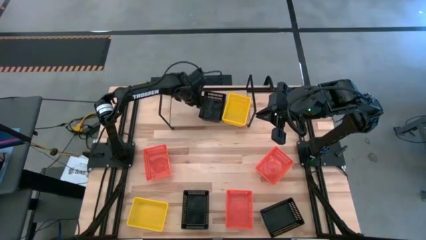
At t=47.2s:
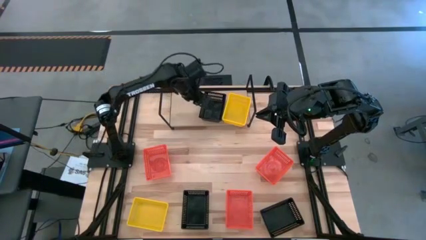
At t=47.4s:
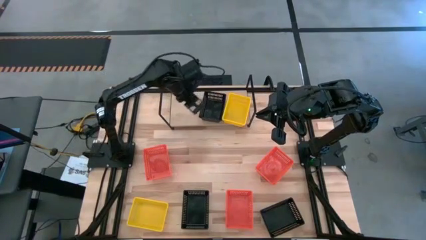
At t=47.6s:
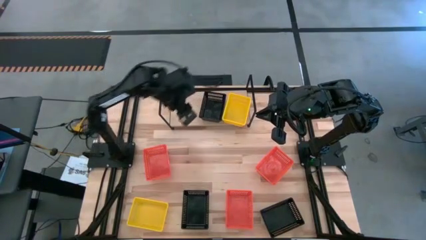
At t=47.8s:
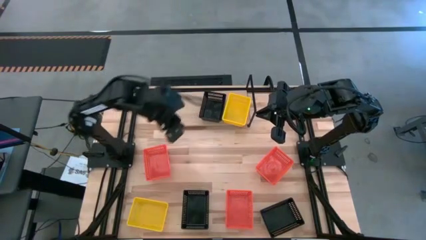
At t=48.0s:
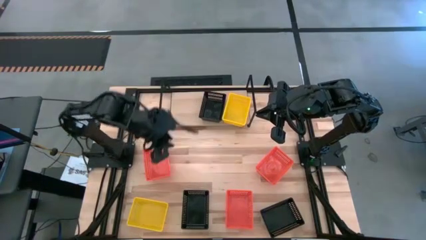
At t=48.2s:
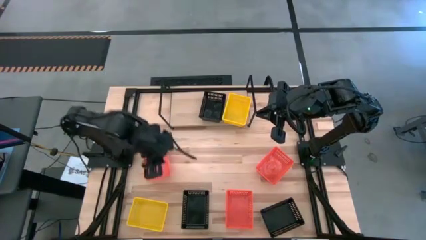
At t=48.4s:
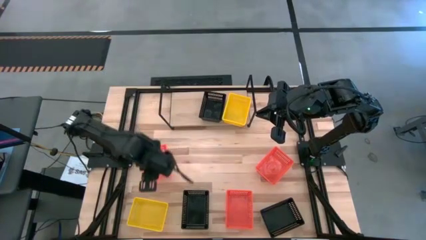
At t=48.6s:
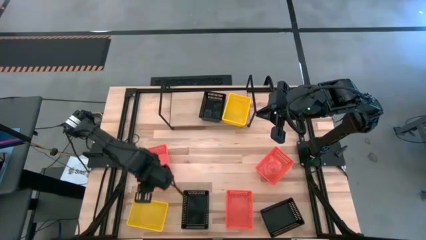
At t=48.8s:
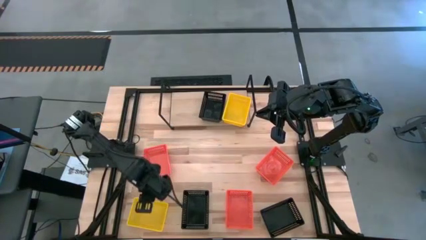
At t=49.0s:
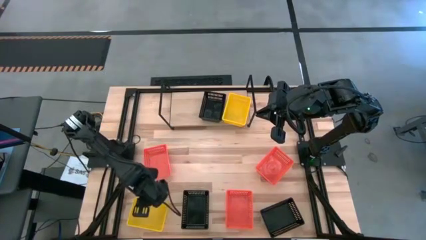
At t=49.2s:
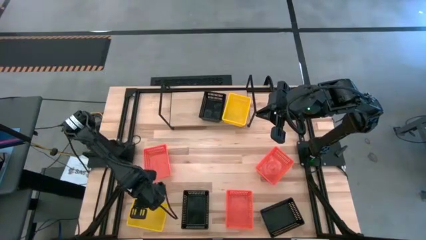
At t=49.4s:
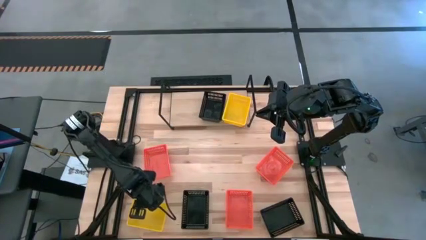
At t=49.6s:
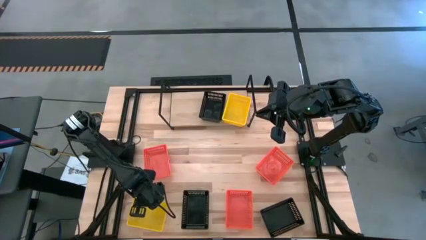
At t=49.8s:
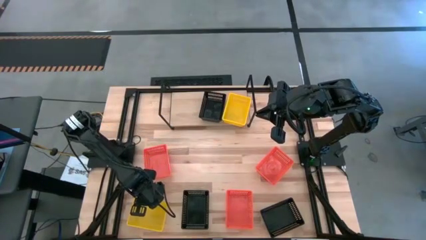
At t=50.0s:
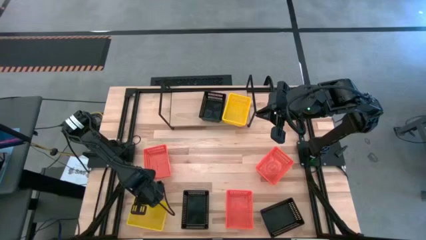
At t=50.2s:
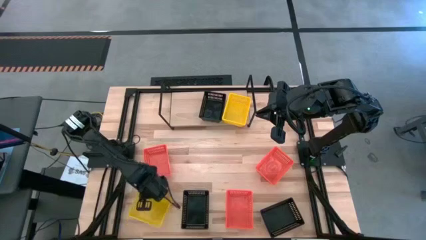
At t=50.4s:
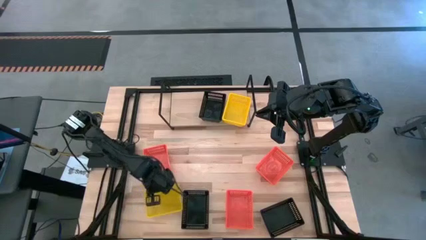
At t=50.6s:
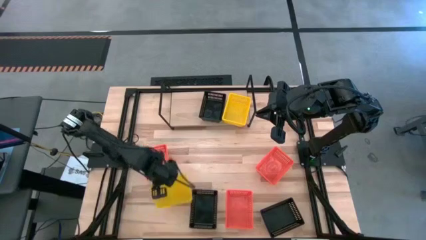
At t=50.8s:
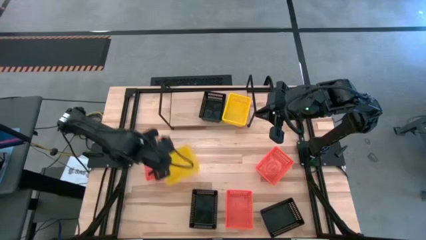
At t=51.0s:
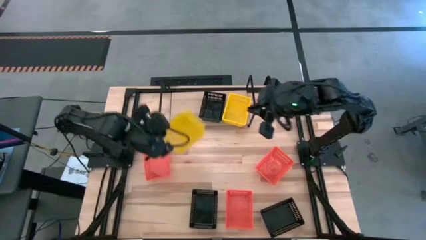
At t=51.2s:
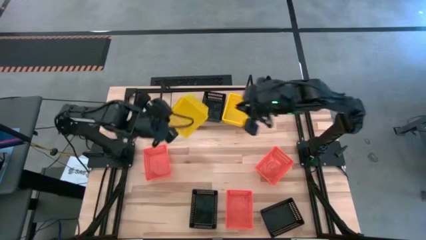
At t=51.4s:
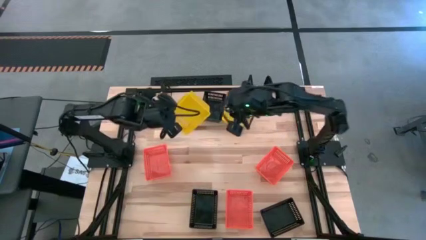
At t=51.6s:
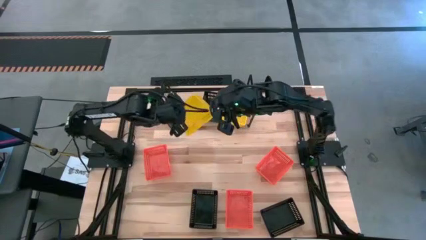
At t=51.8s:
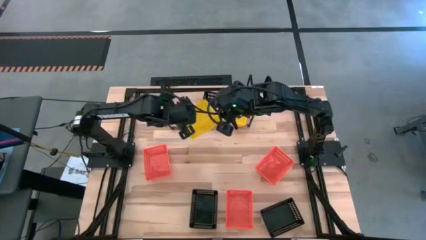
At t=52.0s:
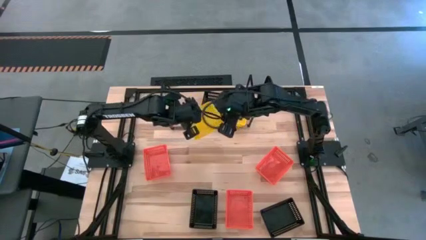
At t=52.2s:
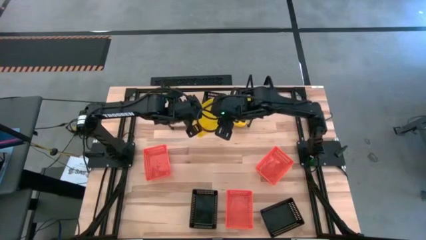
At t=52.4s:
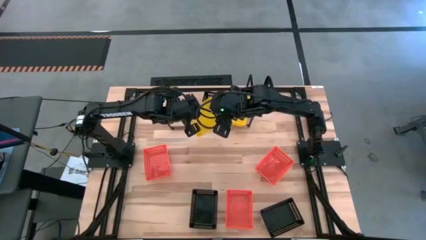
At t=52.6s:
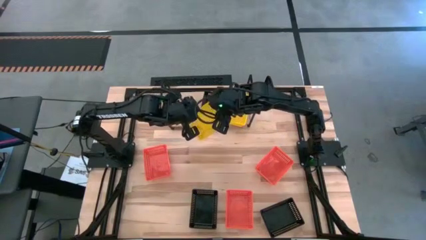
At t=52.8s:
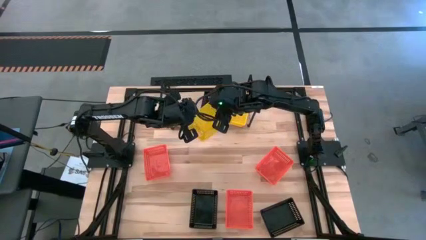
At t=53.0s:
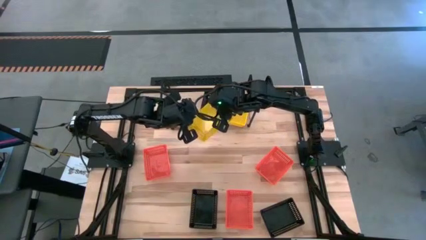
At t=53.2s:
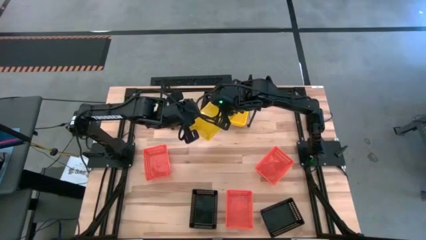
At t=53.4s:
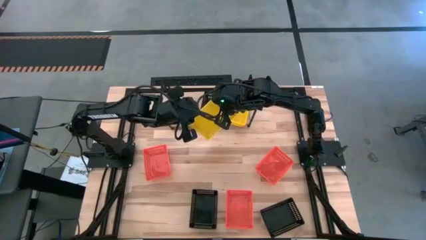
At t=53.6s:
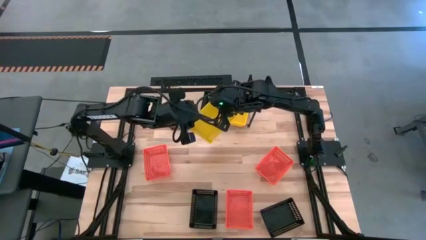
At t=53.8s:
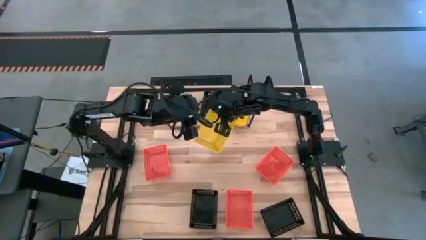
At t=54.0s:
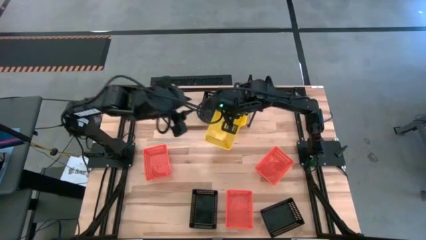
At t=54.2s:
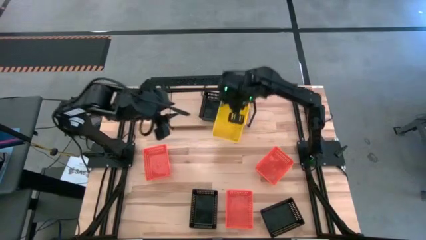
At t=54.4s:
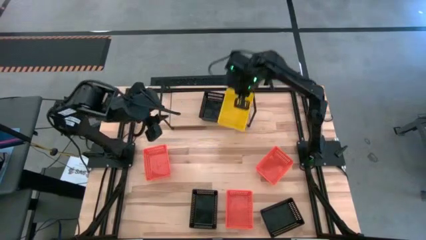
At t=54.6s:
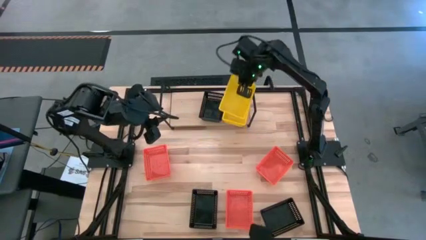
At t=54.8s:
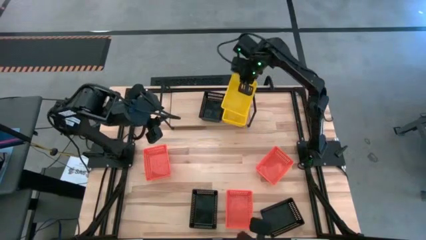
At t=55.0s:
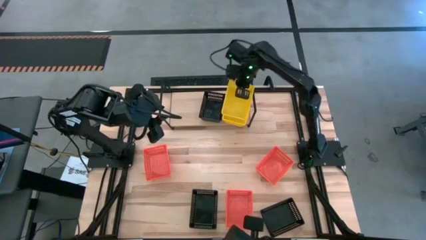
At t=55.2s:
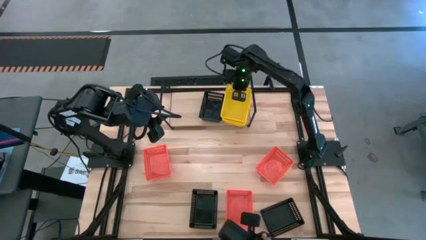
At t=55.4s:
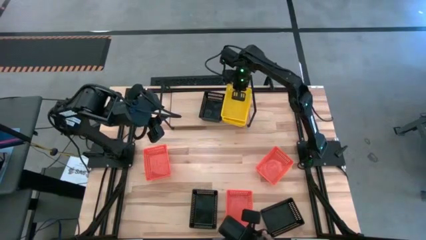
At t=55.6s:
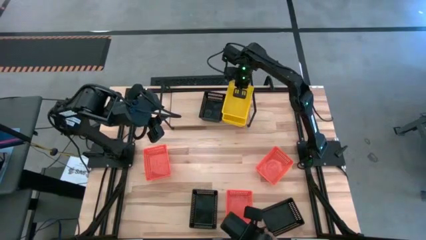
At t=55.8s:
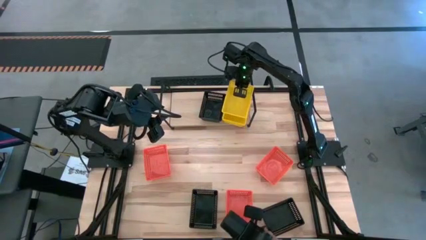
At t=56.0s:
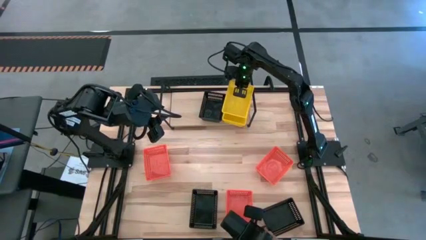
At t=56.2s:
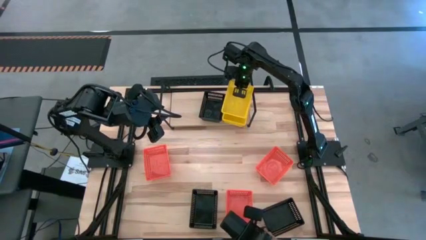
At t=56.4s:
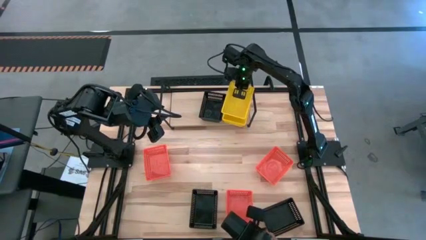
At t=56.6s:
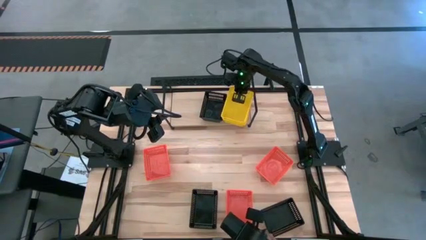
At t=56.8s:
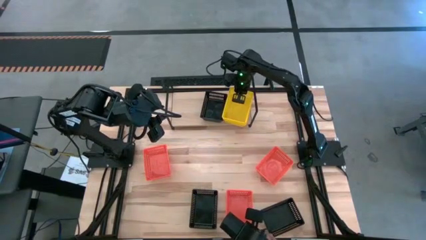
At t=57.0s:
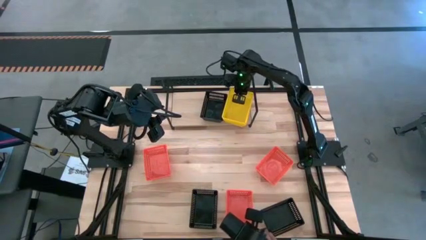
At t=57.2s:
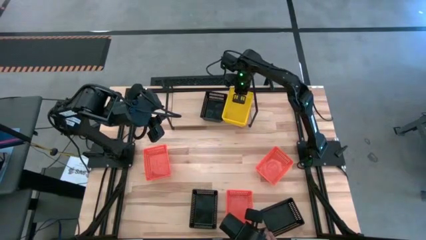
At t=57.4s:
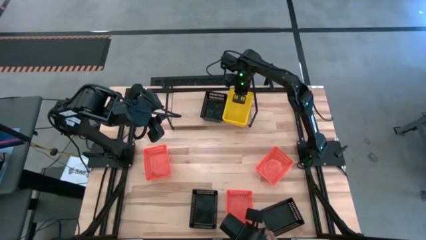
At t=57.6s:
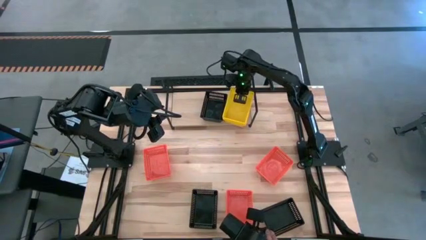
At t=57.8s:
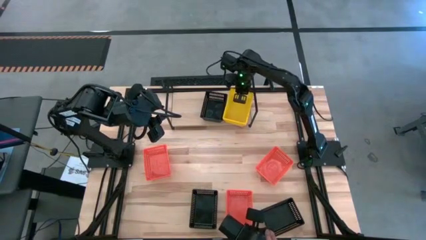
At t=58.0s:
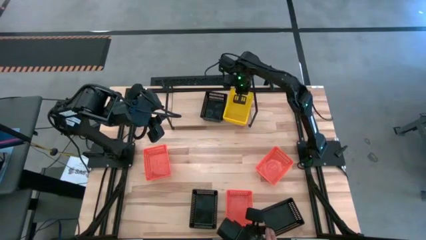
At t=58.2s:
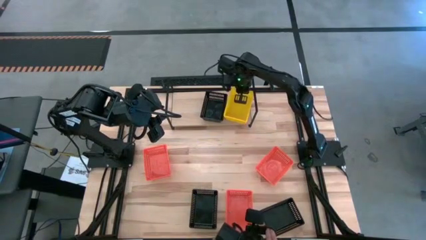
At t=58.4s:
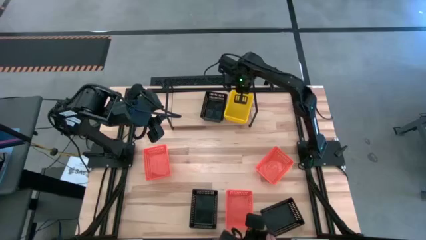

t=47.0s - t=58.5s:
Task: Stack baskets on shelf by color
Stack the yellow basket on the yellow basket on the shelf
